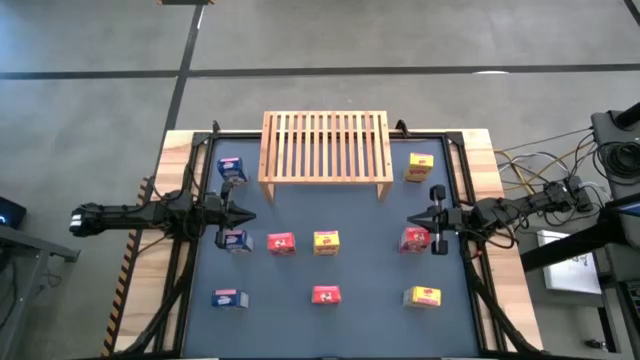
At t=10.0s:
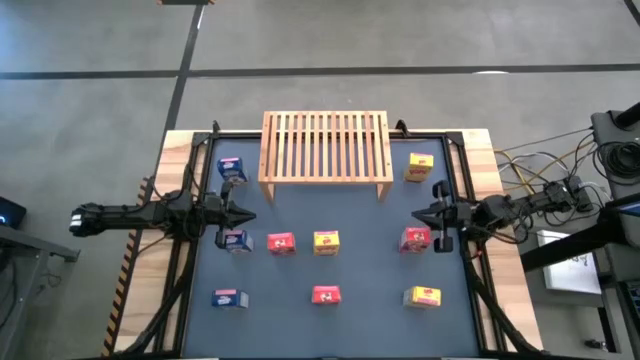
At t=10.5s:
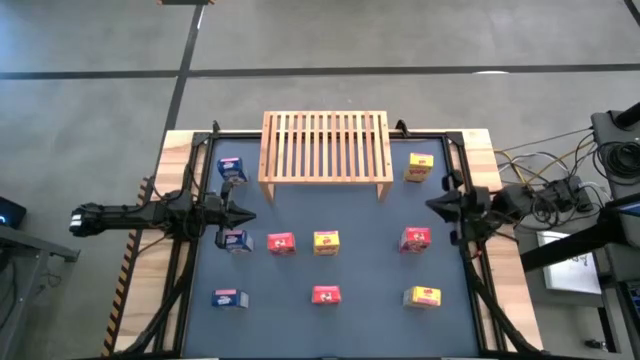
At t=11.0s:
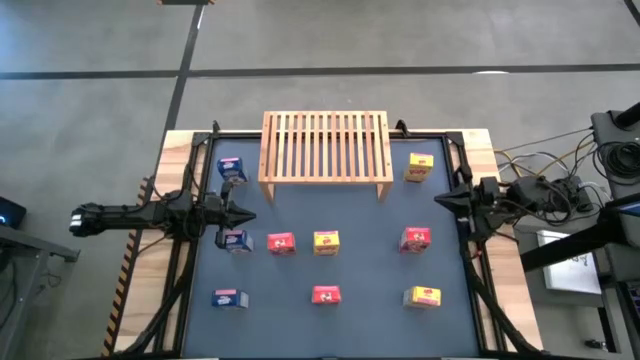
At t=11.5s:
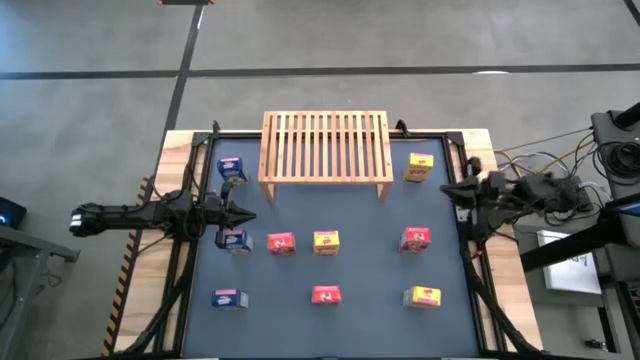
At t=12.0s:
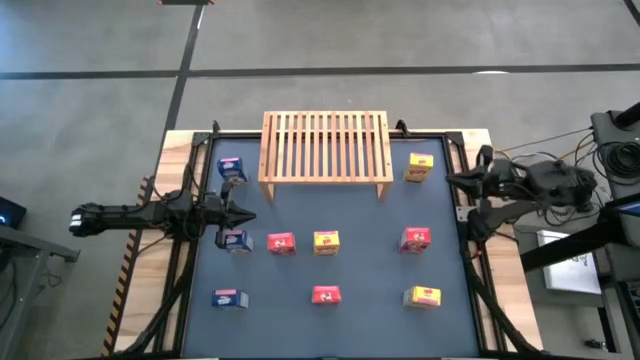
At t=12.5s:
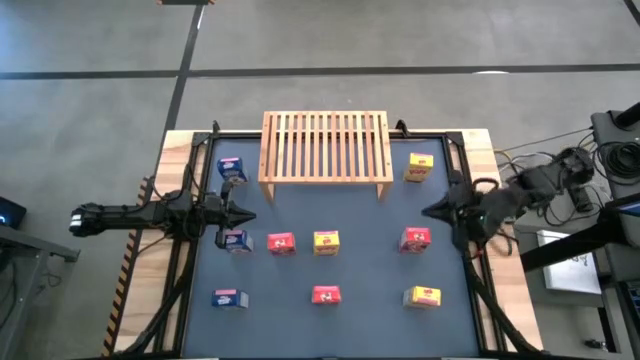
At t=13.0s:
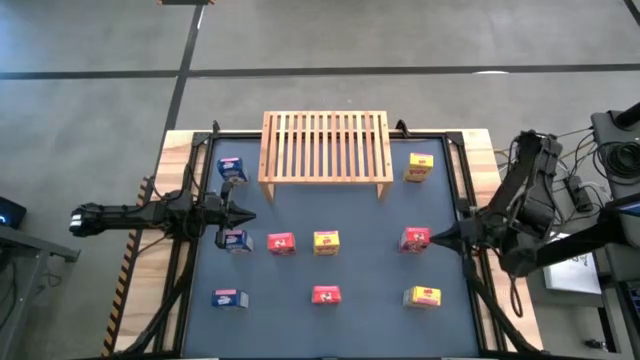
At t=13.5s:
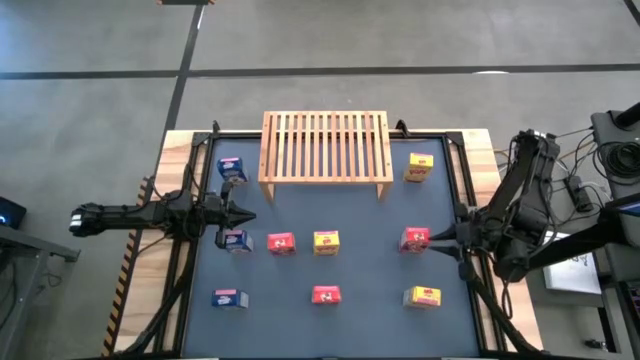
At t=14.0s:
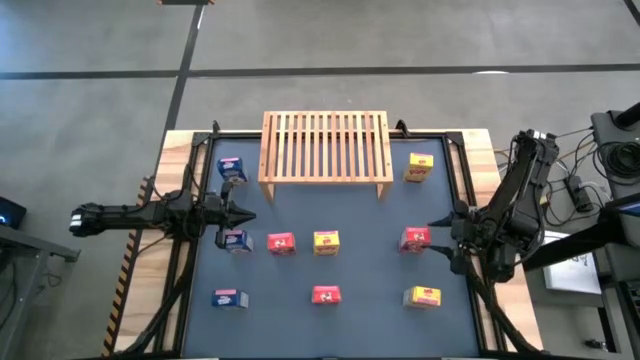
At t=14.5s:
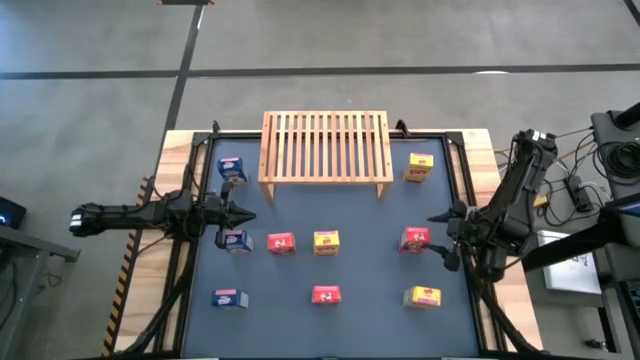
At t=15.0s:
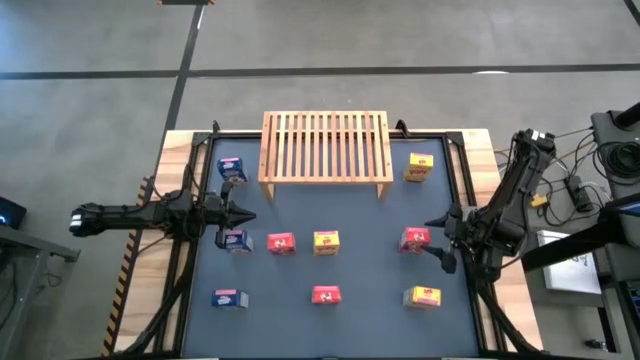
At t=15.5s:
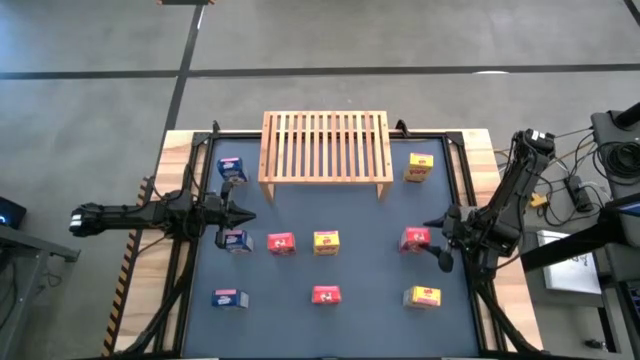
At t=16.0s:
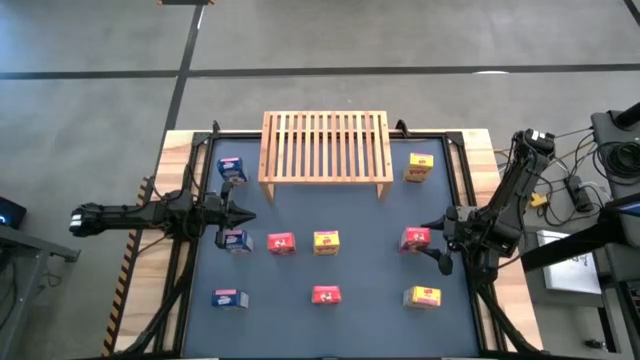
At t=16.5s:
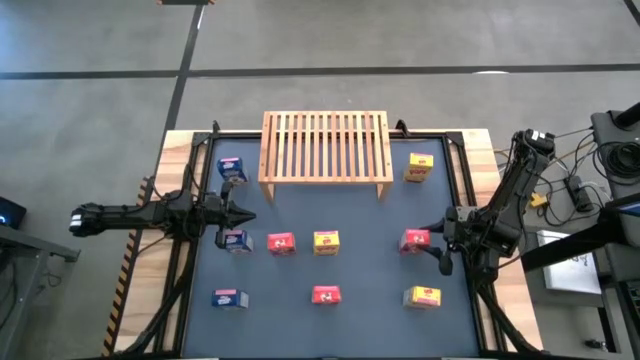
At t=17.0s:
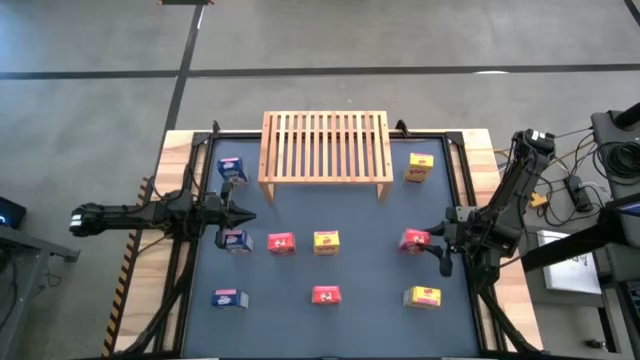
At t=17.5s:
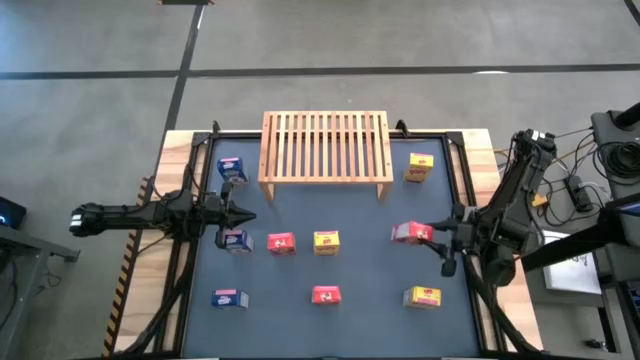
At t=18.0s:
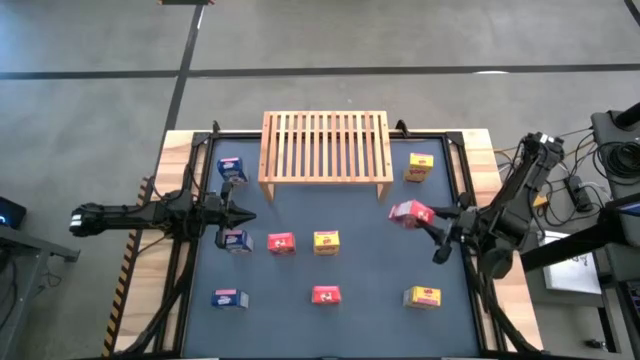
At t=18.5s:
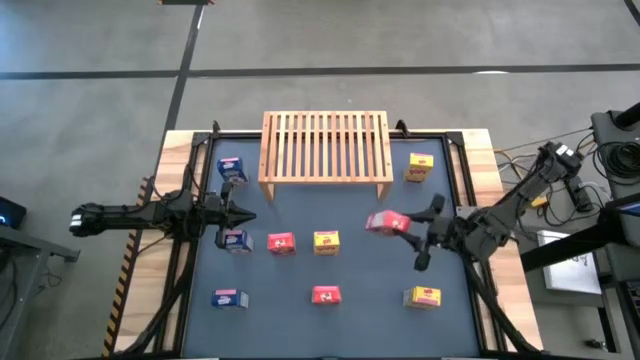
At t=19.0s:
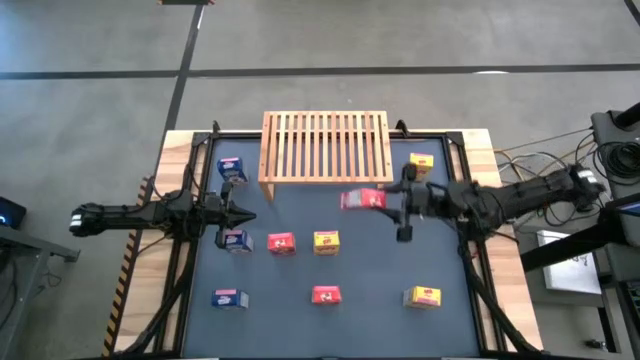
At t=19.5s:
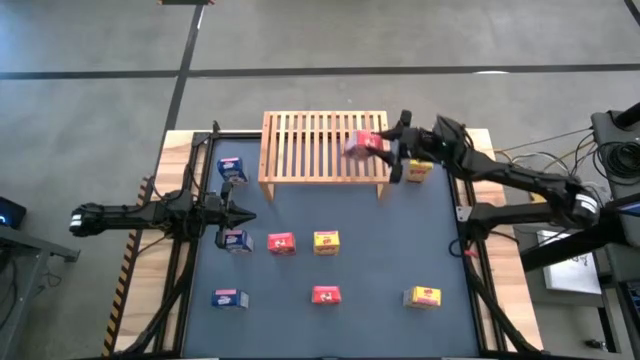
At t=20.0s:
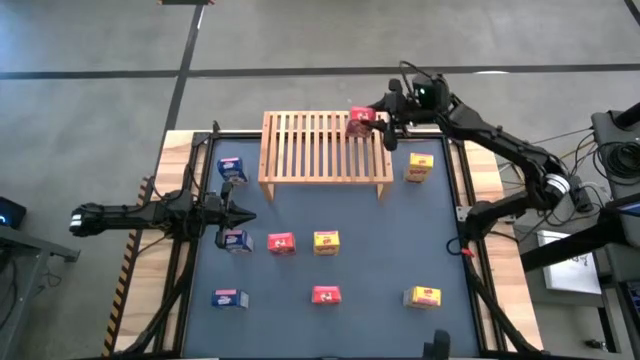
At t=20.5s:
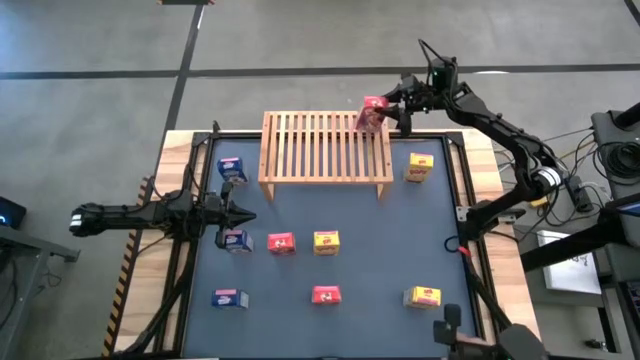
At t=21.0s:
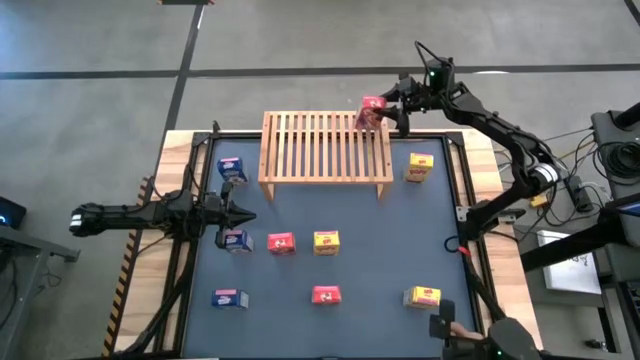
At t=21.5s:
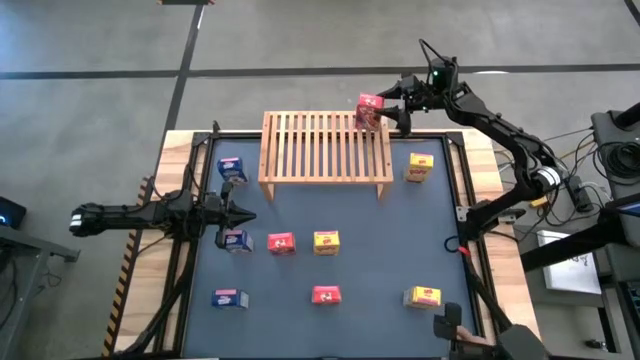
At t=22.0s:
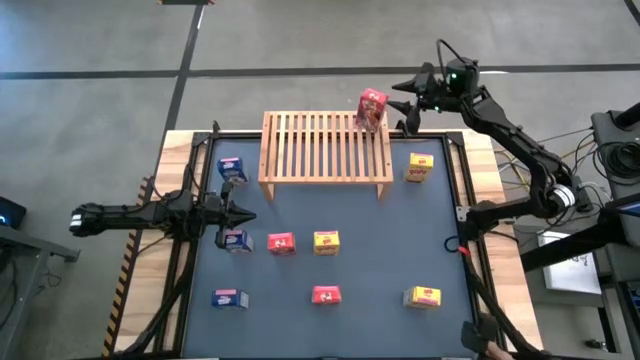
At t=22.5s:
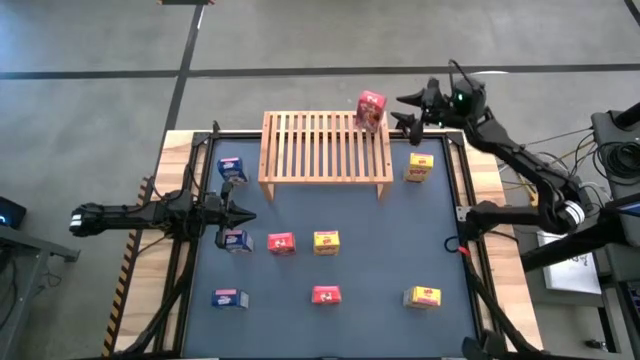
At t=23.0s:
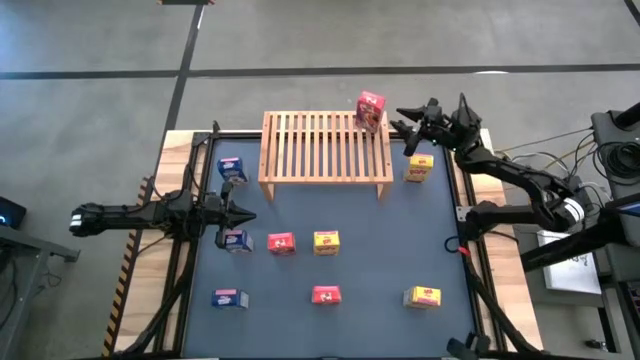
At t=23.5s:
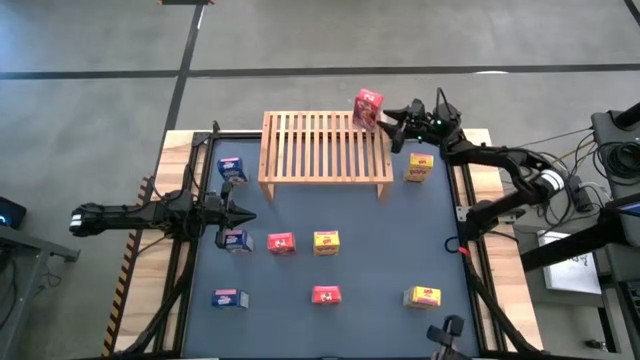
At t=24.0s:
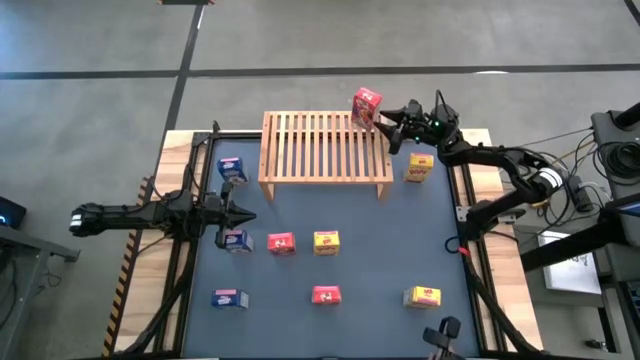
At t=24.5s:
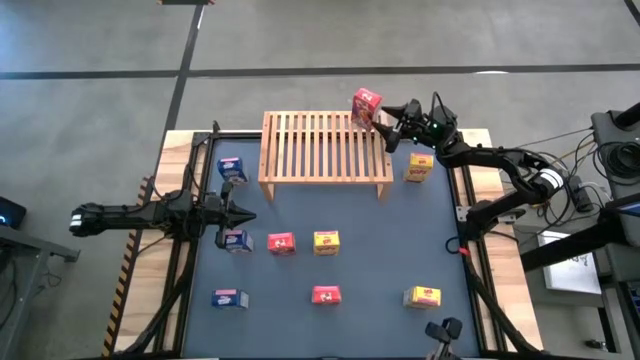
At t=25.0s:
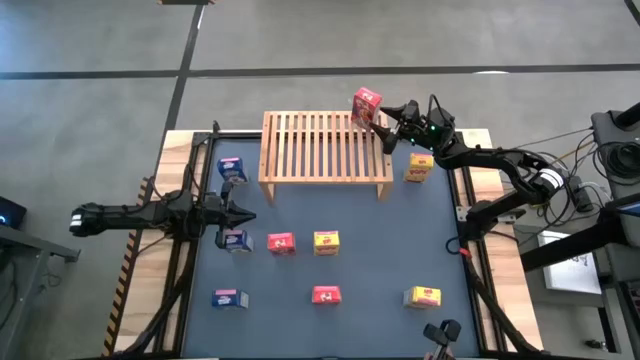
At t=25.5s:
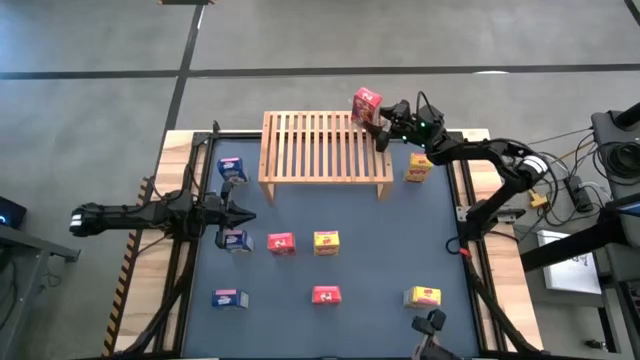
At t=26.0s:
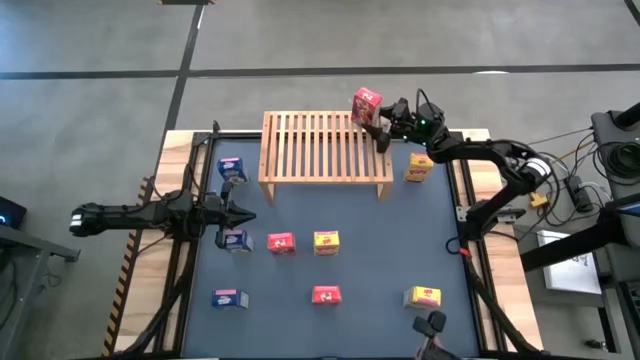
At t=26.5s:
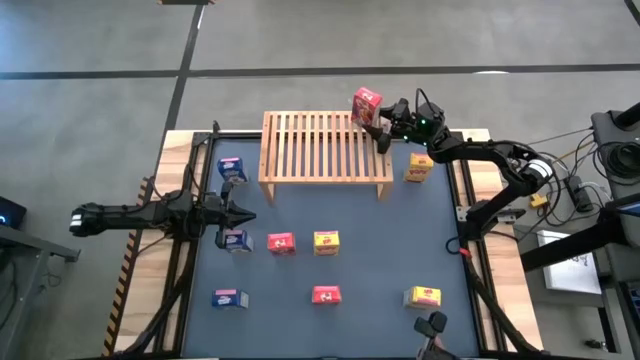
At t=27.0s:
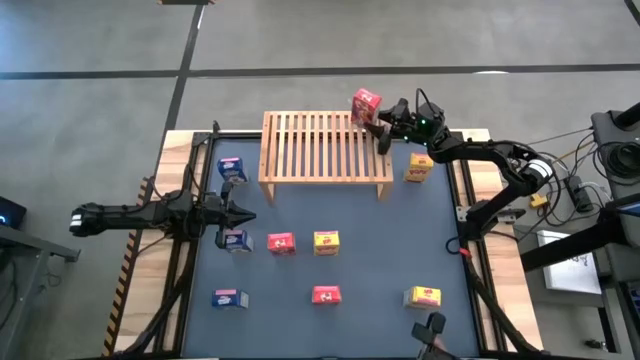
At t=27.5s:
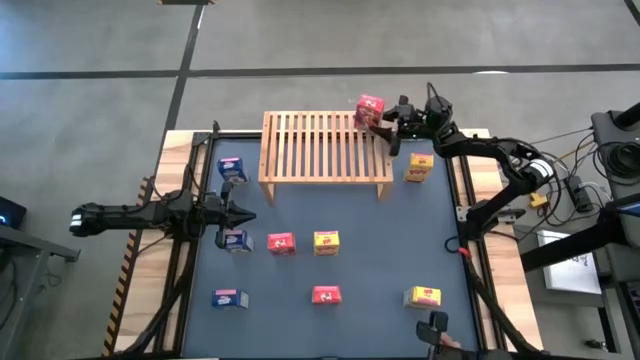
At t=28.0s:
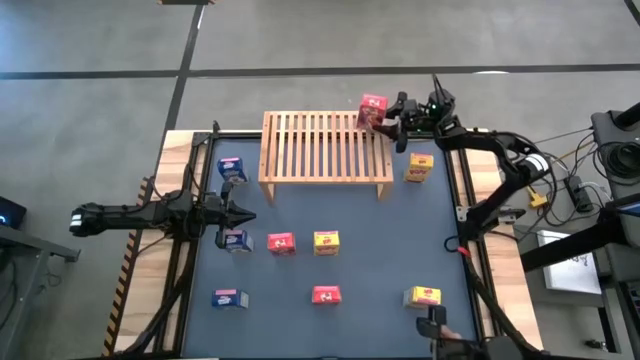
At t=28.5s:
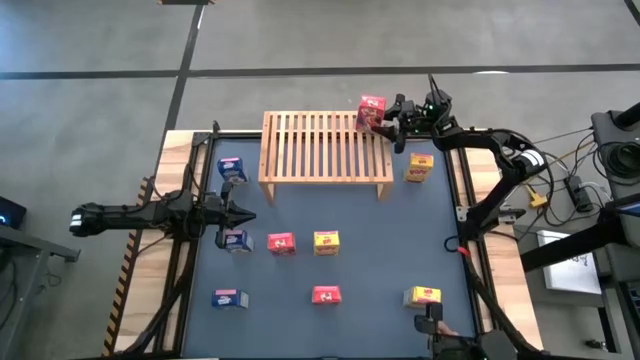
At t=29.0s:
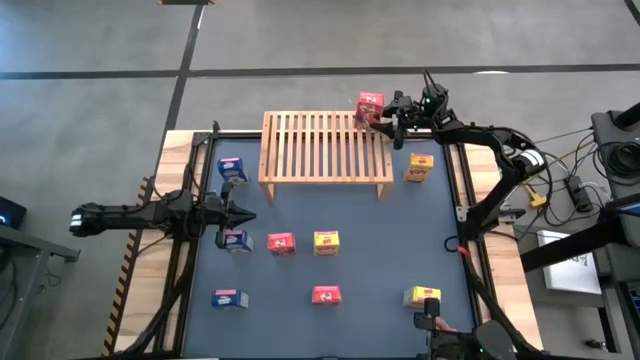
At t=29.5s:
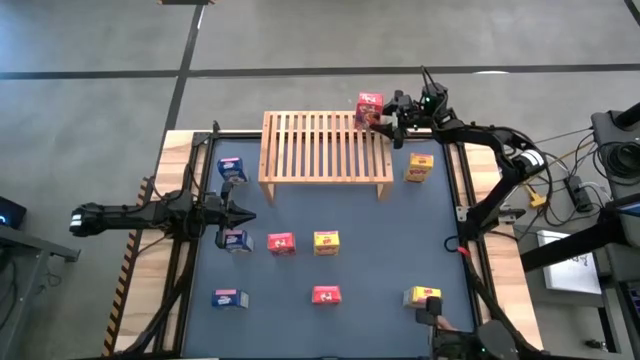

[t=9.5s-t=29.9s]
Task: Stack cereal on shelf
Put the top right red cereal box on the shelf
